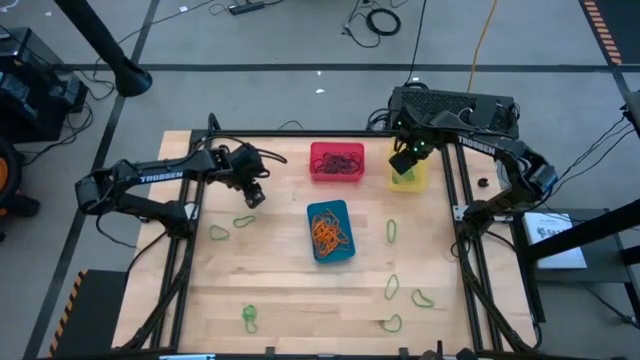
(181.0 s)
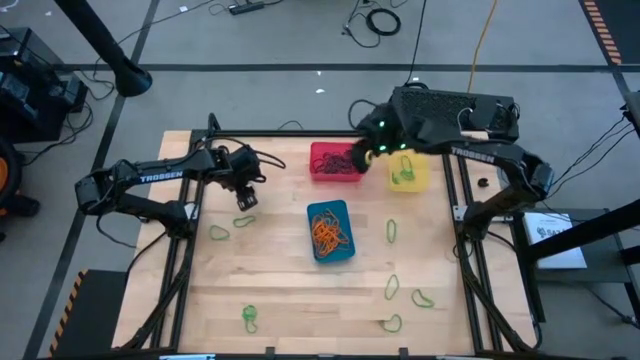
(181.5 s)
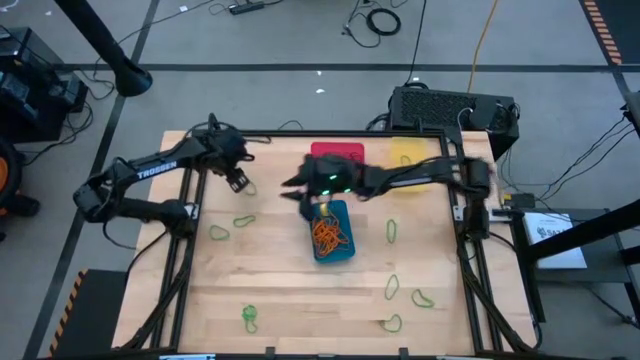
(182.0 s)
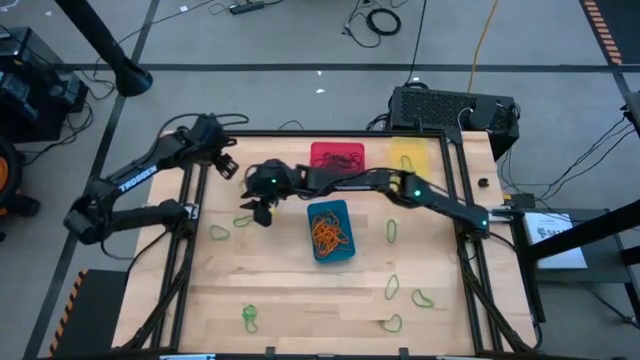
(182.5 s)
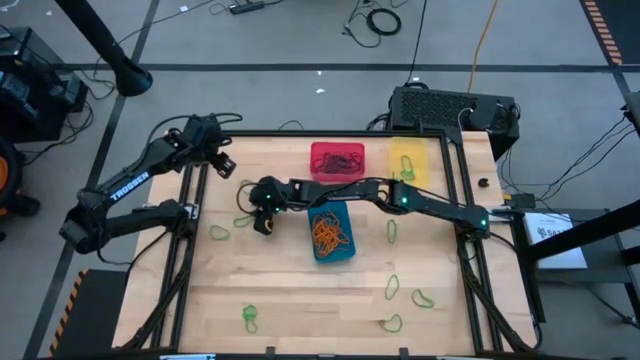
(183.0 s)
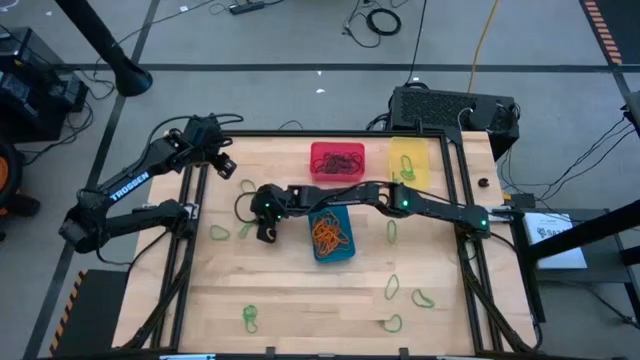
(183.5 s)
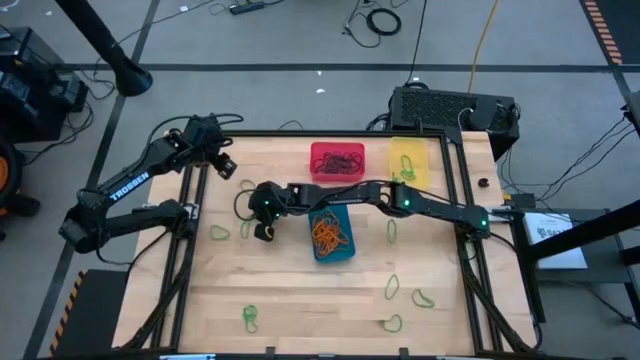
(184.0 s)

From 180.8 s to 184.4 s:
Task: Sort rubber bands into baskets
Put the green rubber band into the yellow bin

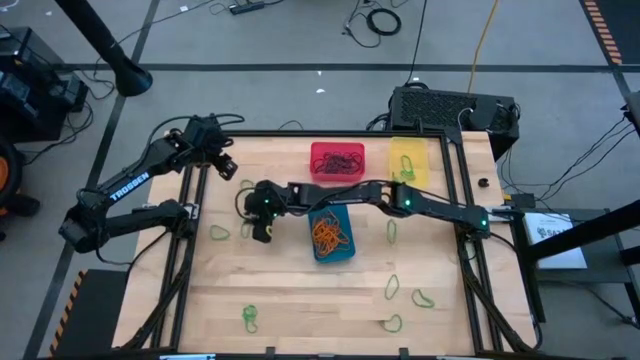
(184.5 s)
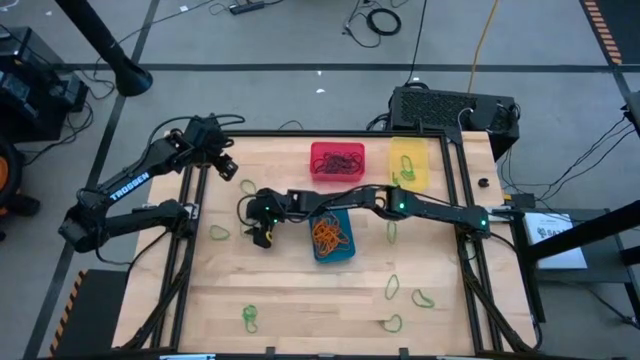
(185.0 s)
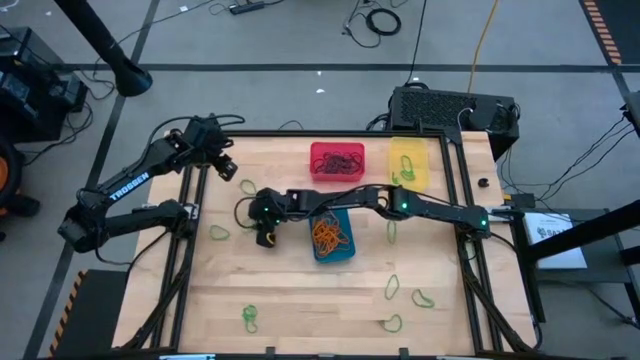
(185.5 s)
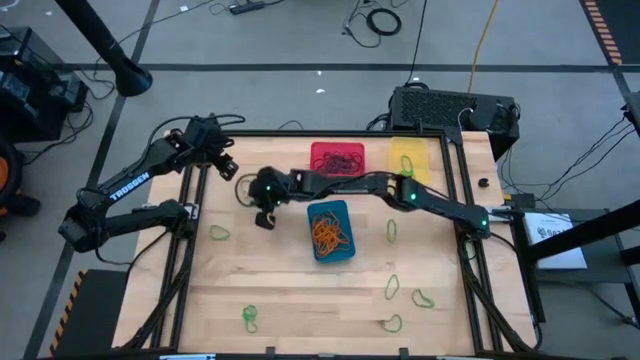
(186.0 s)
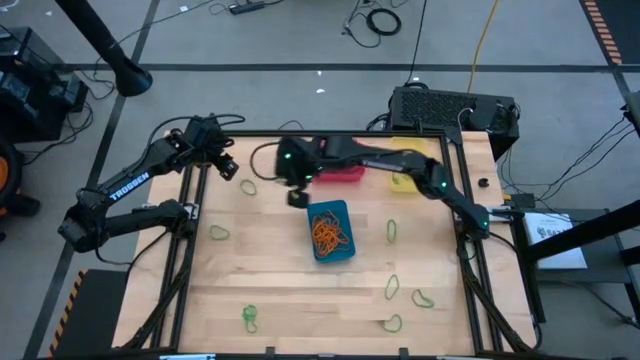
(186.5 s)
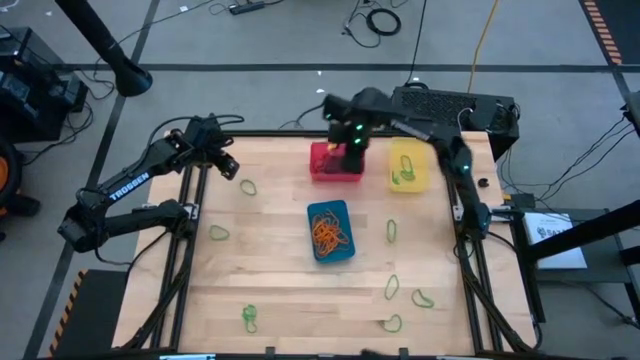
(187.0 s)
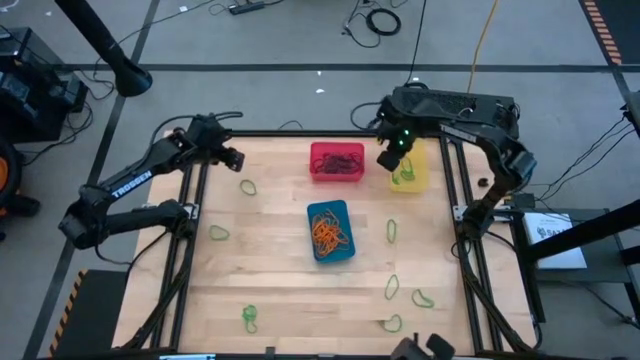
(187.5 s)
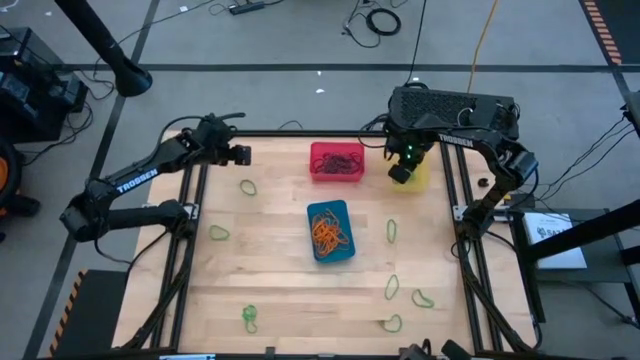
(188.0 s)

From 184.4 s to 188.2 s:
Put the green rubber band into the yellow bin

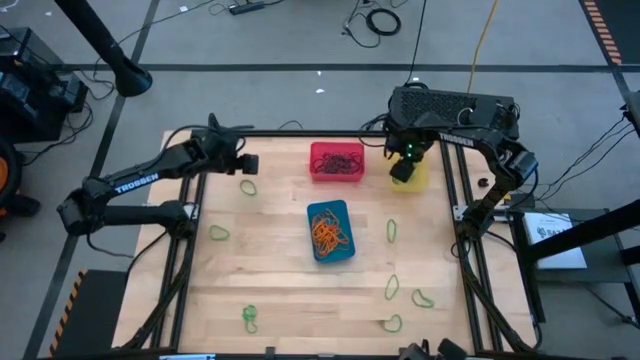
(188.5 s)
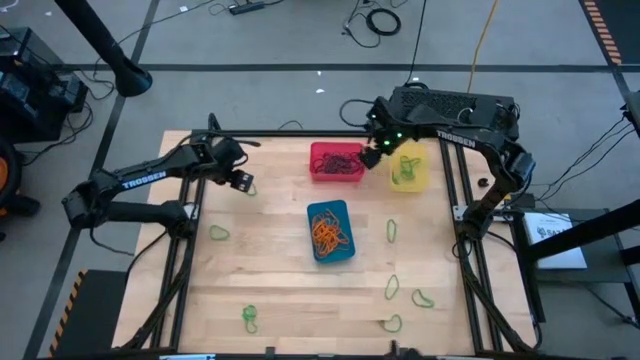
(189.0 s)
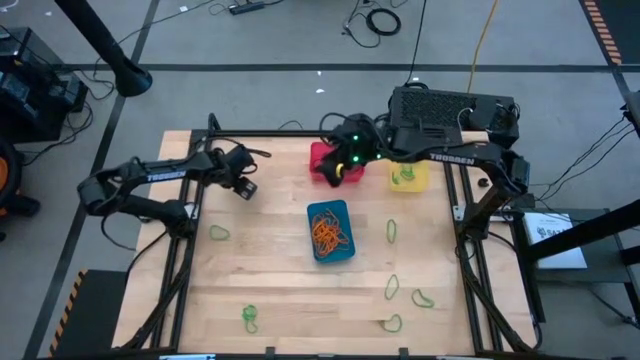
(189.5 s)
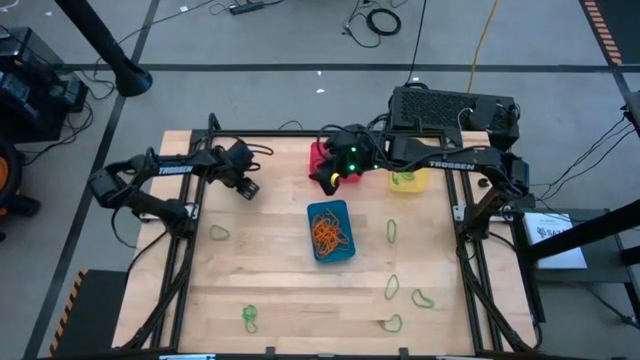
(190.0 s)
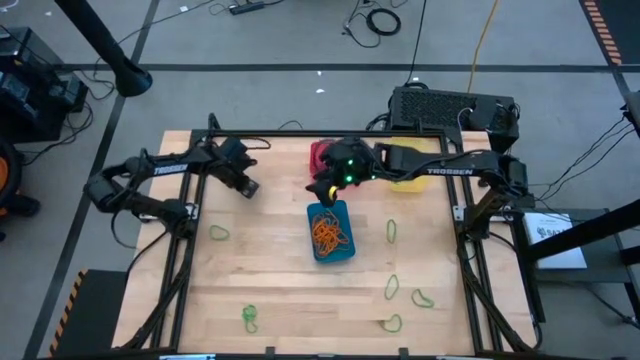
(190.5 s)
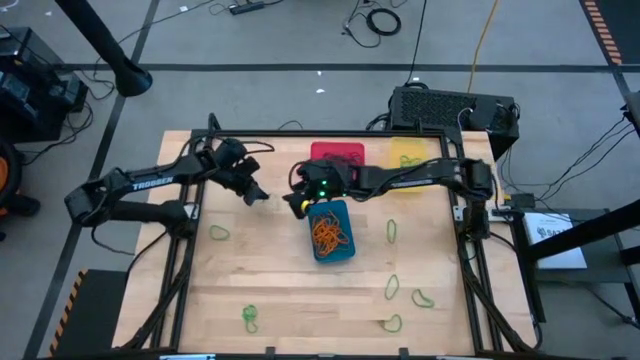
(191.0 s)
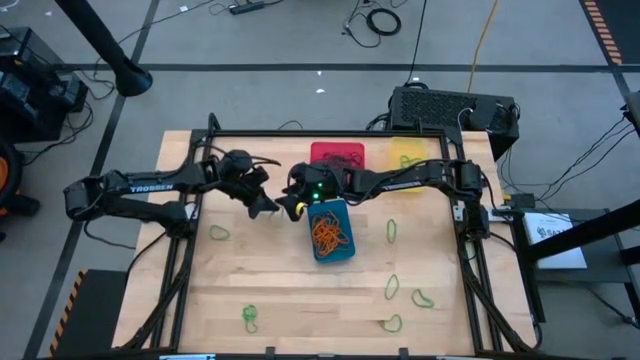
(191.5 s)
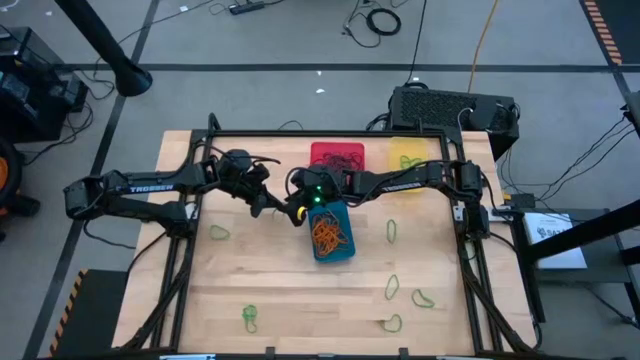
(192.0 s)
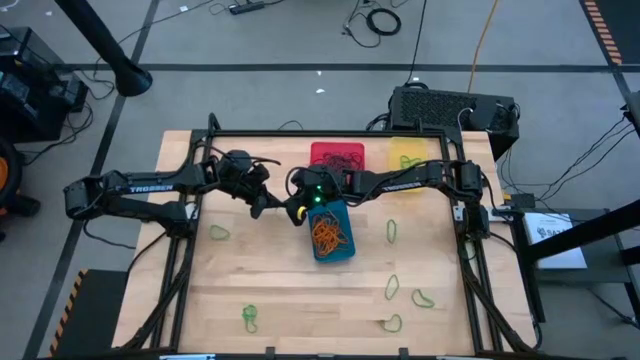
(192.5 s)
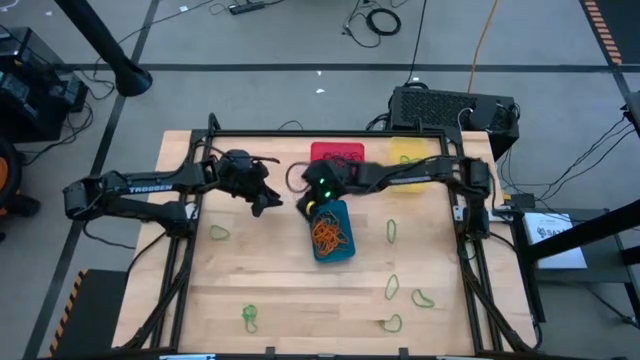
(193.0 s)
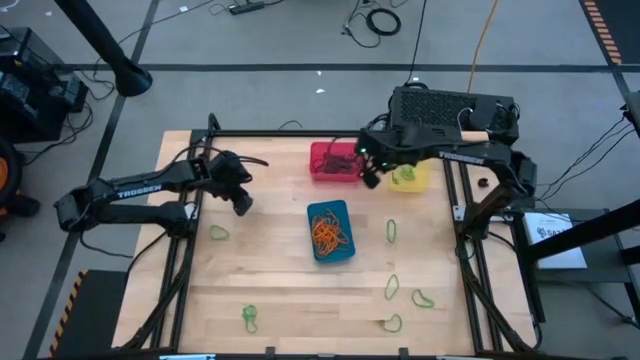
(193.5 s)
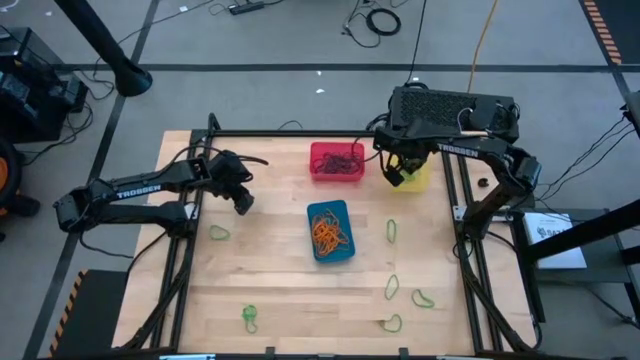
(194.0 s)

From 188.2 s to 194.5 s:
Put the green rubber band into the yellow bin

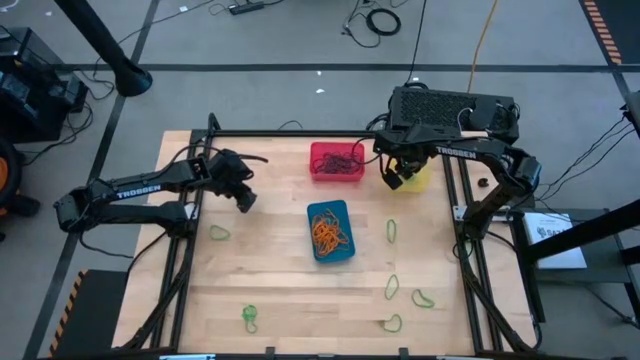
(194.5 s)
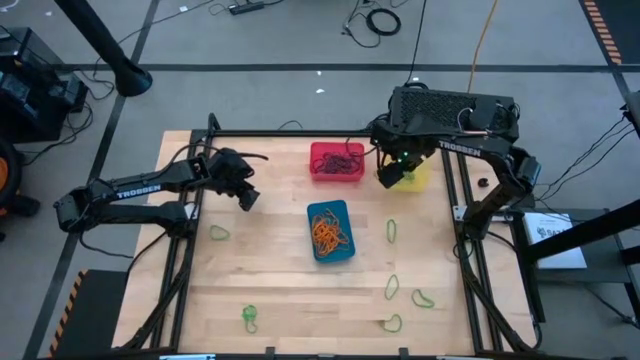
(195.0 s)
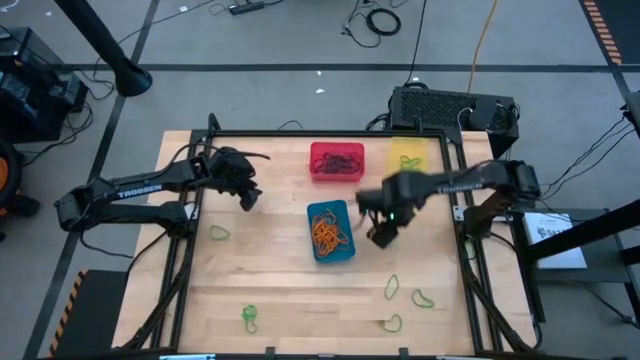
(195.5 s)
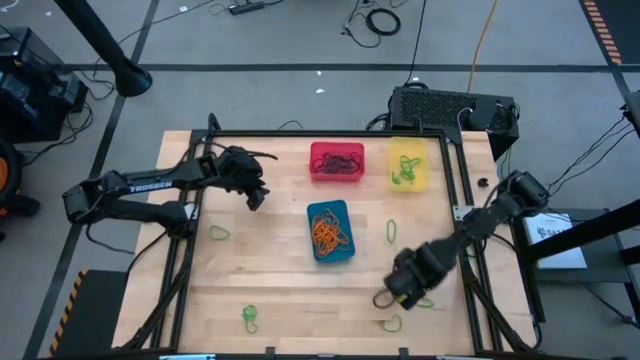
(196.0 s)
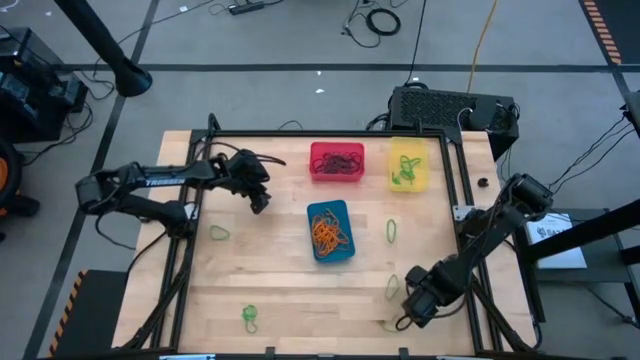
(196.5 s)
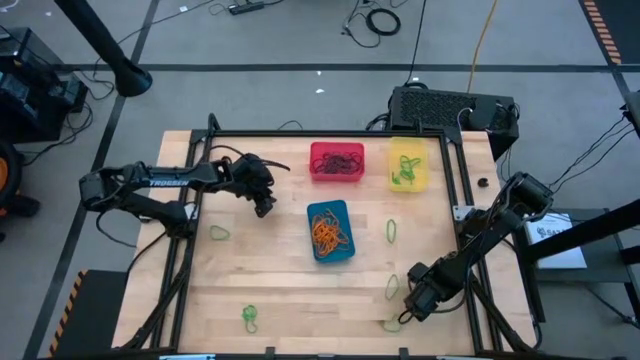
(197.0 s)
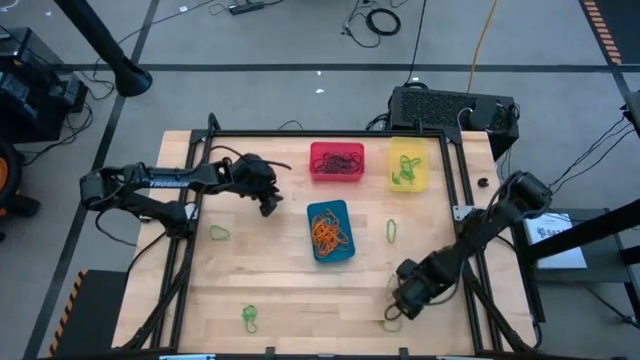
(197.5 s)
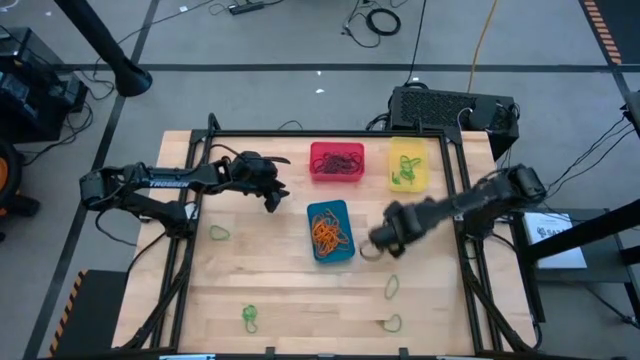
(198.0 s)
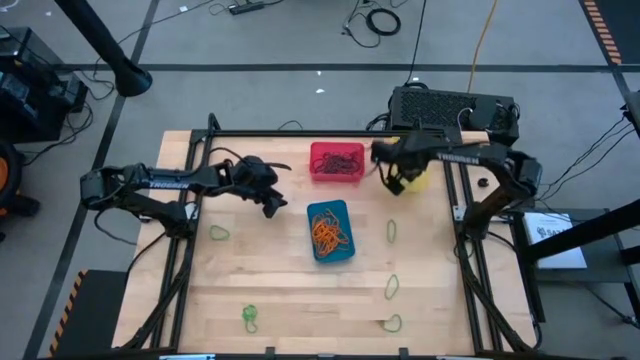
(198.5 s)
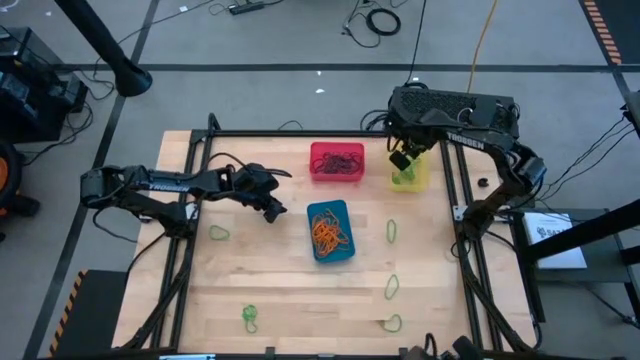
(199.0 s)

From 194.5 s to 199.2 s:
Put the green rubber band into the yellow bin

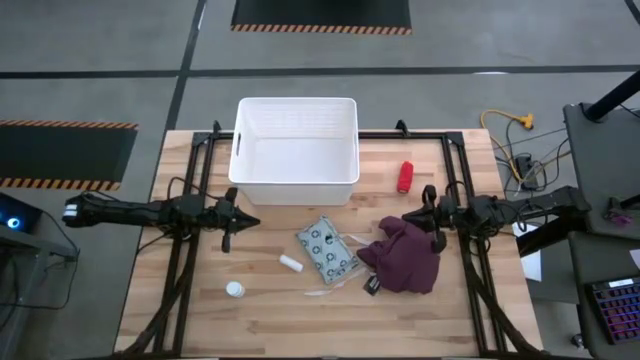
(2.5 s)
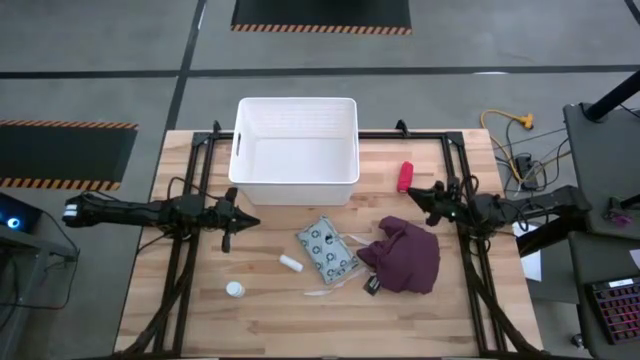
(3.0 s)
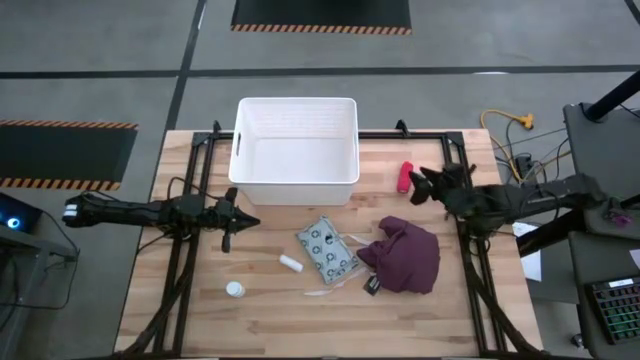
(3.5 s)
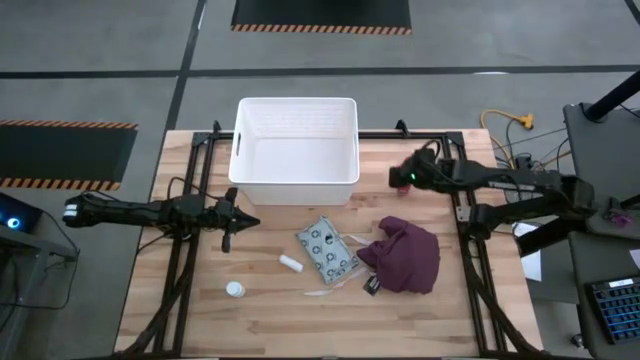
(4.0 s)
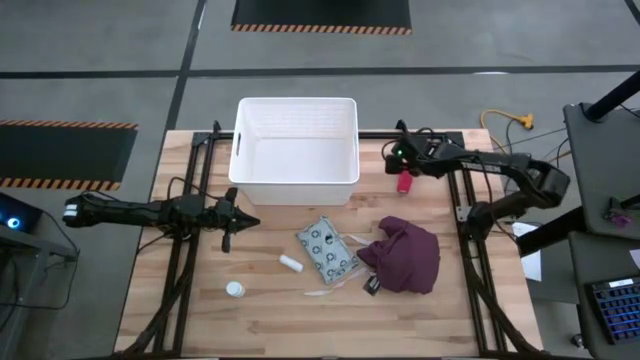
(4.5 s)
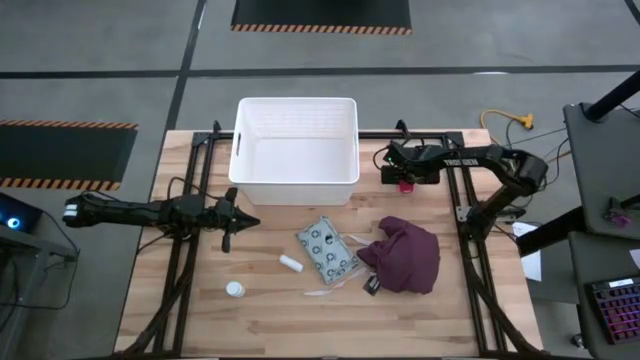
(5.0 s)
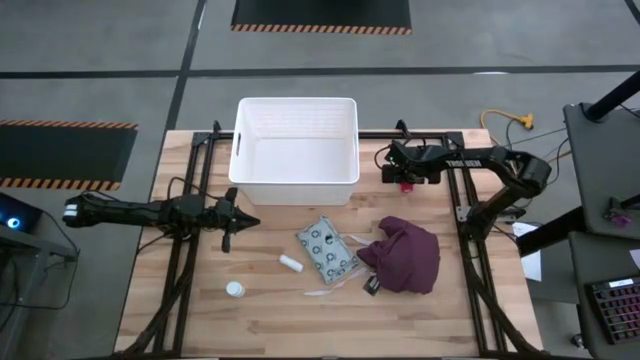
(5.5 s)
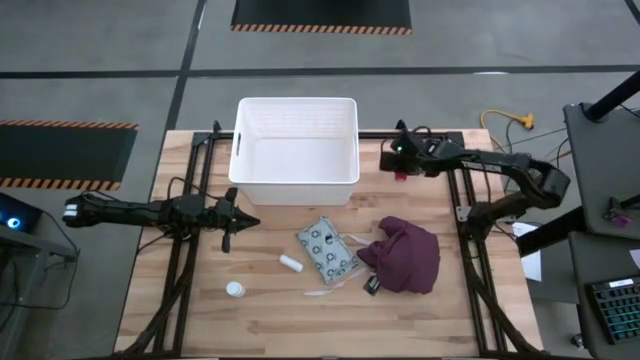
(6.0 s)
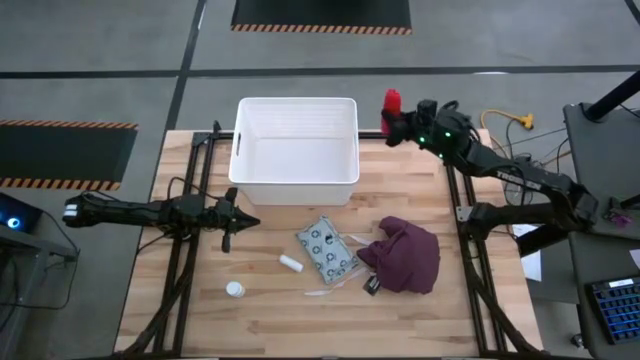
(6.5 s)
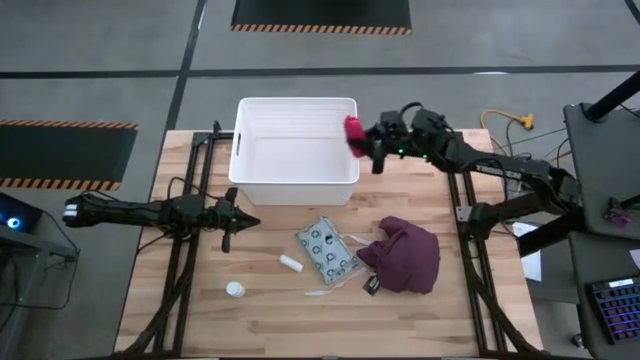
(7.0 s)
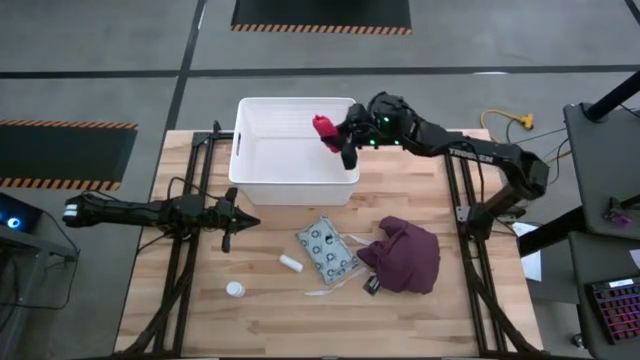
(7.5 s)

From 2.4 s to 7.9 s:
Task: Pick & place medical supplies in basket/bin
Put the red bandage into the white bin
